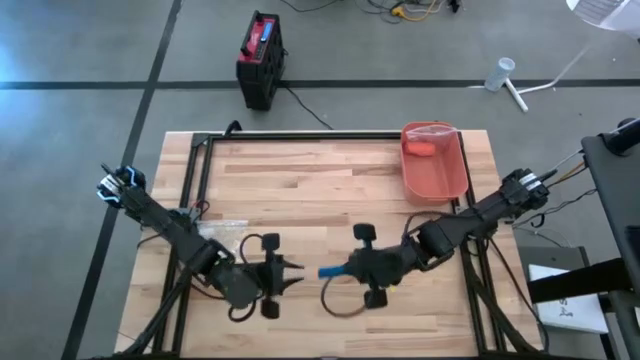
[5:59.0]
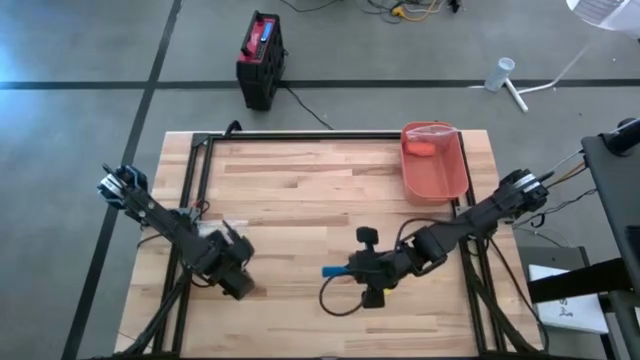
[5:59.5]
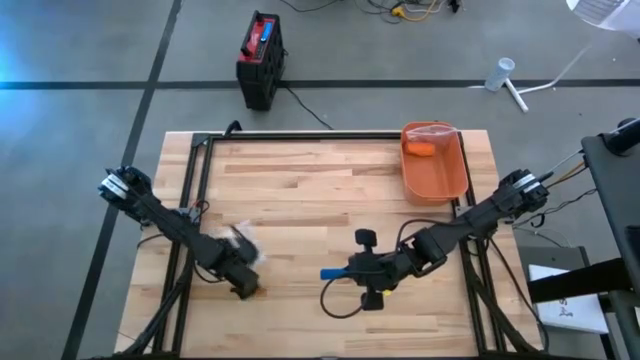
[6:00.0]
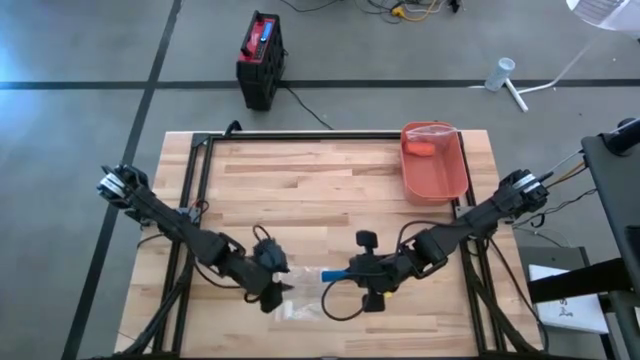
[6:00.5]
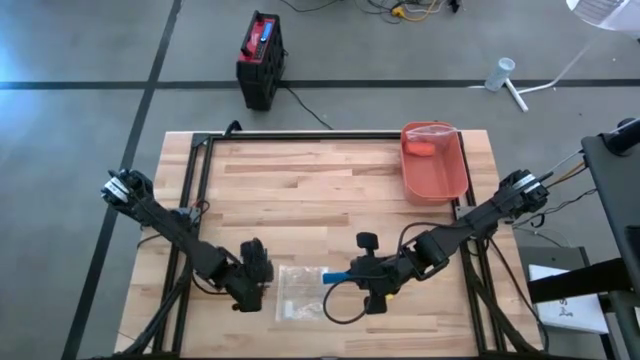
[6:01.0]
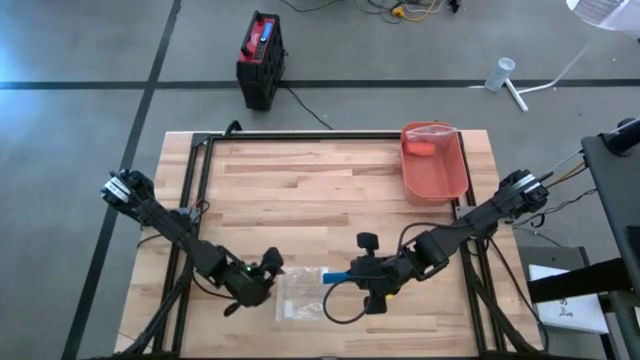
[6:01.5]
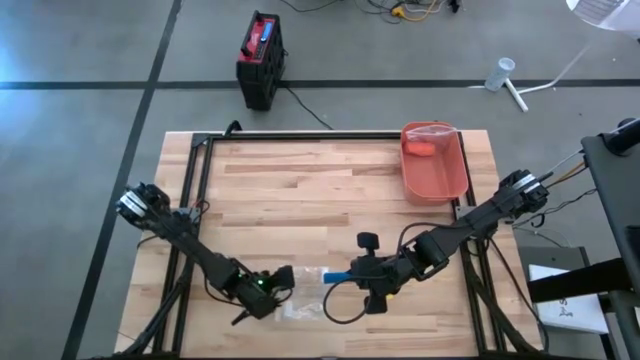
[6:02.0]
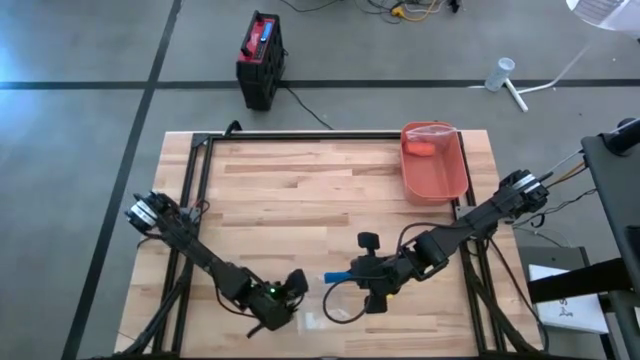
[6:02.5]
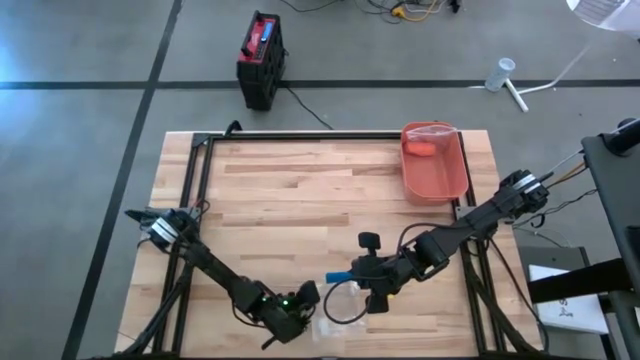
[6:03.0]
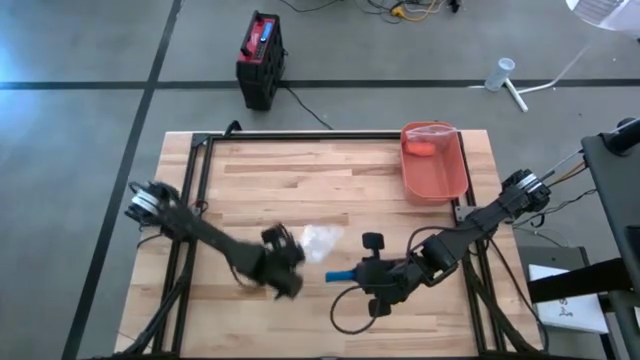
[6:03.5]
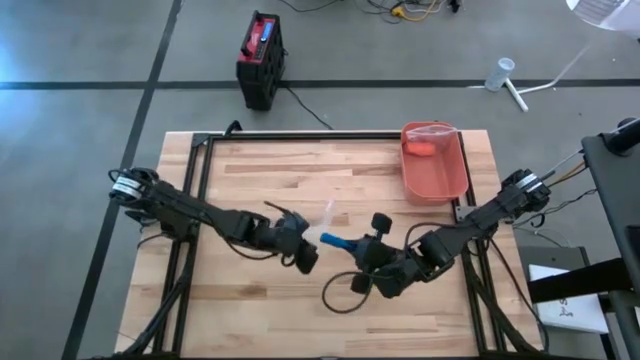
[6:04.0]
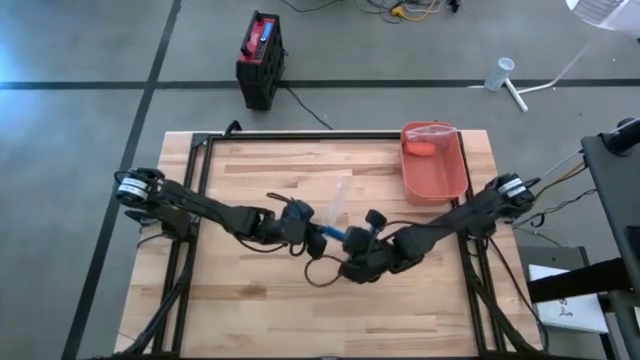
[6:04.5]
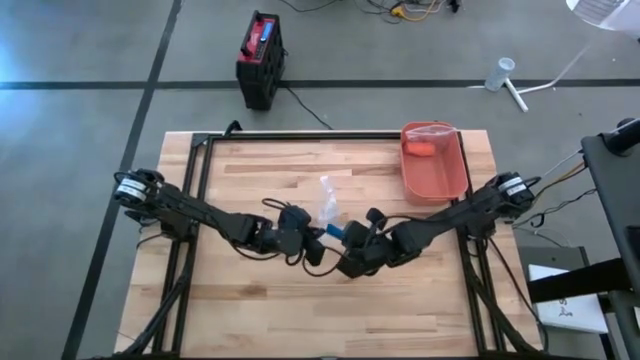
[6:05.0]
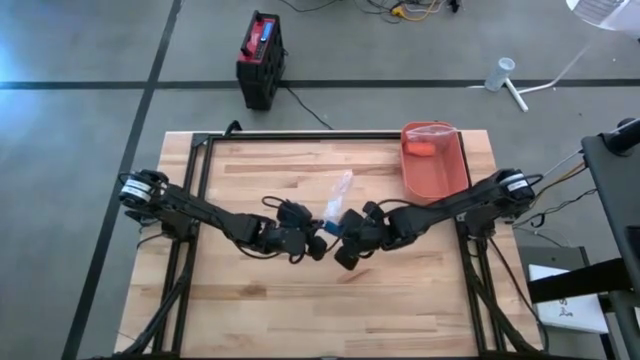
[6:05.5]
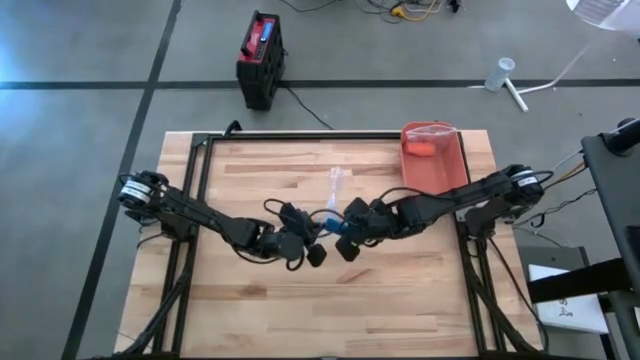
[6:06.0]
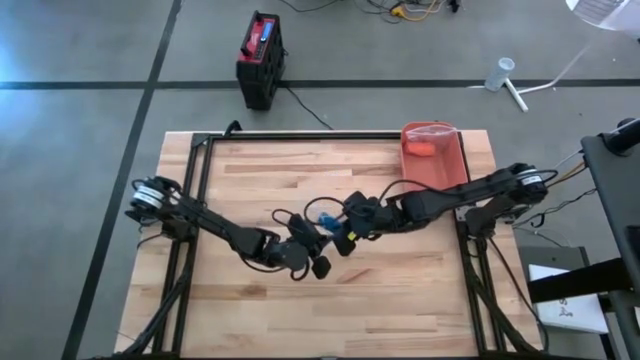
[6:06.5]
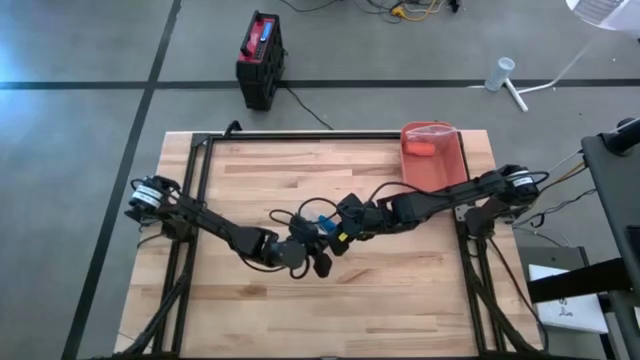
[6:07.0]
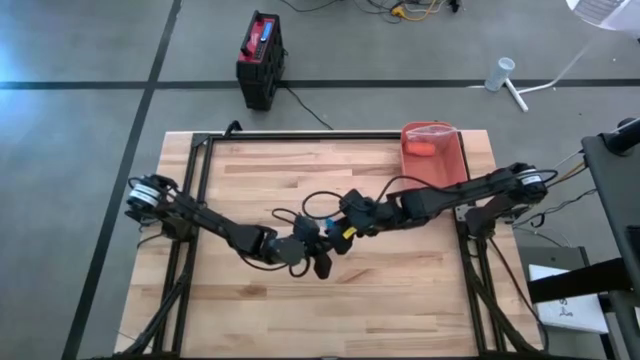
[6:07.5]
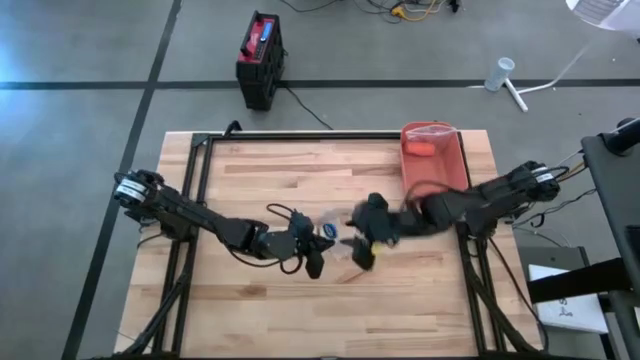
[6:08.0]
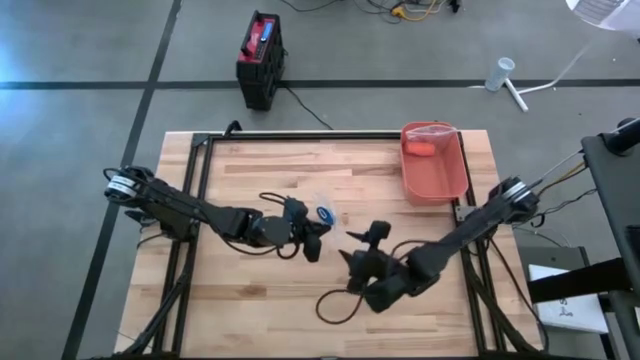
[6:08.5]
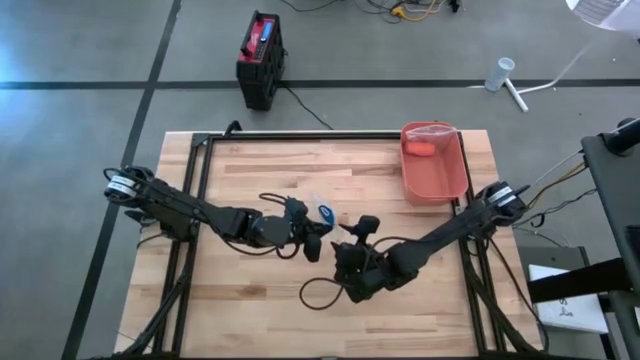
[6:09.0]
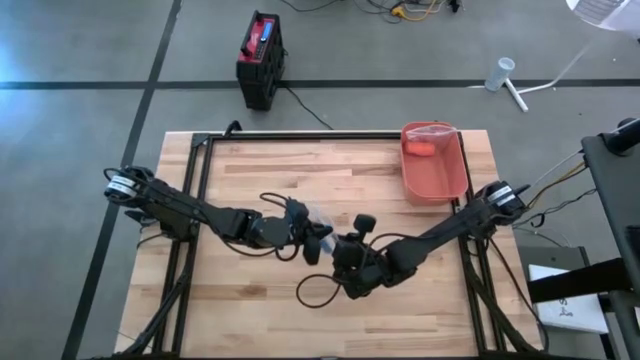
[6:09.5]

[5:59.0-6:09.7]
Task: Roll bandage
Put the blue bandage into the transparent zip bag

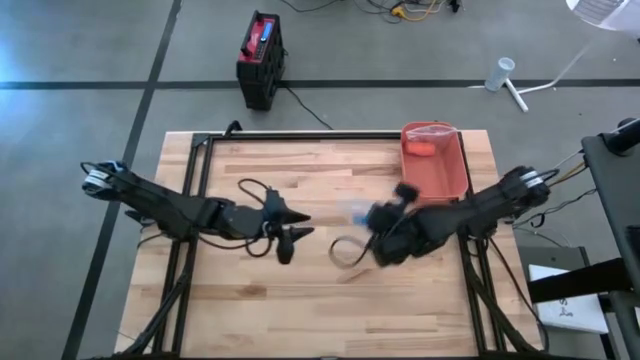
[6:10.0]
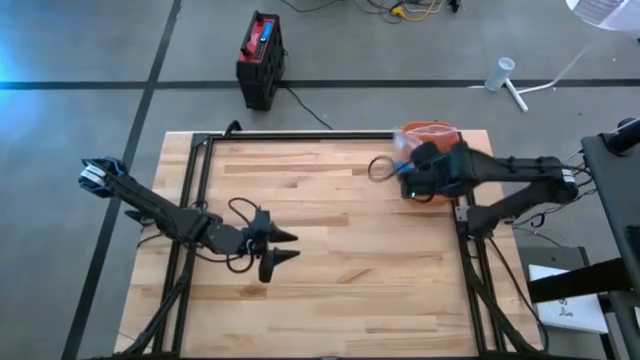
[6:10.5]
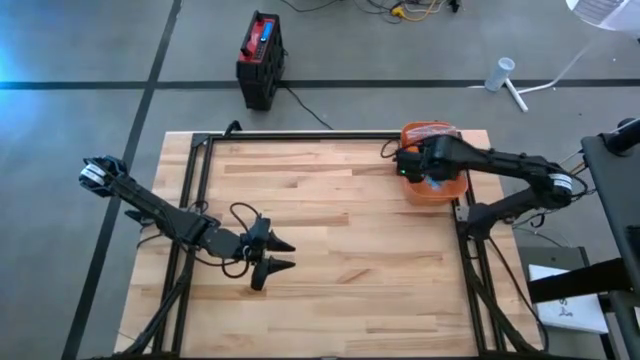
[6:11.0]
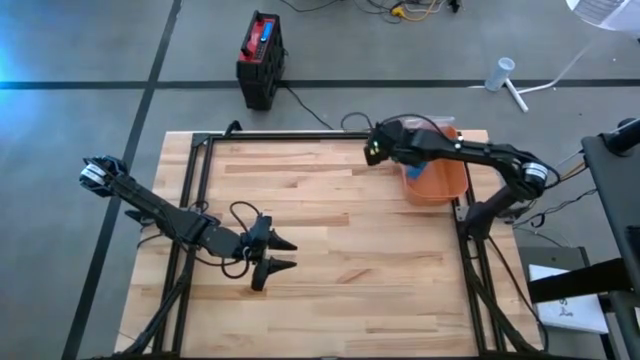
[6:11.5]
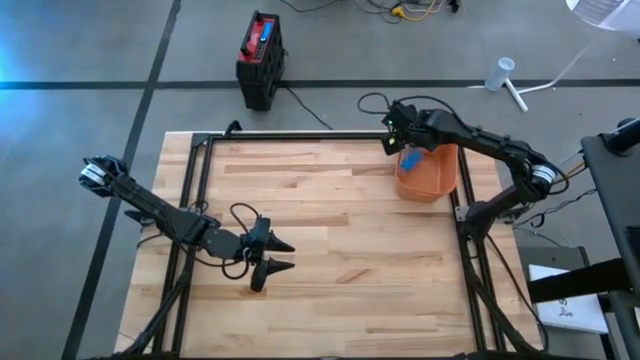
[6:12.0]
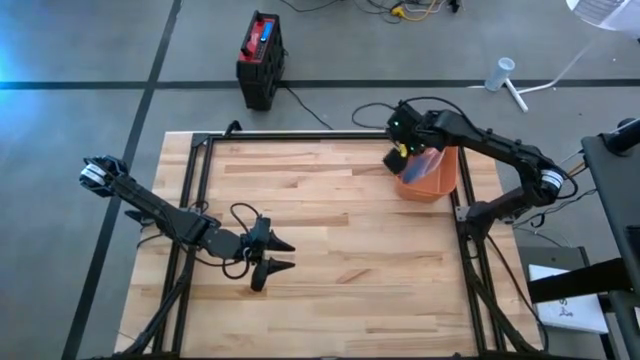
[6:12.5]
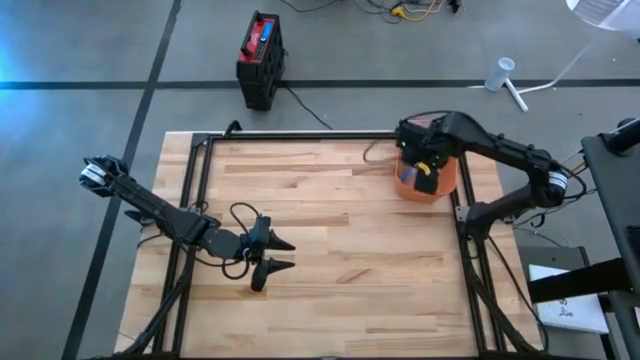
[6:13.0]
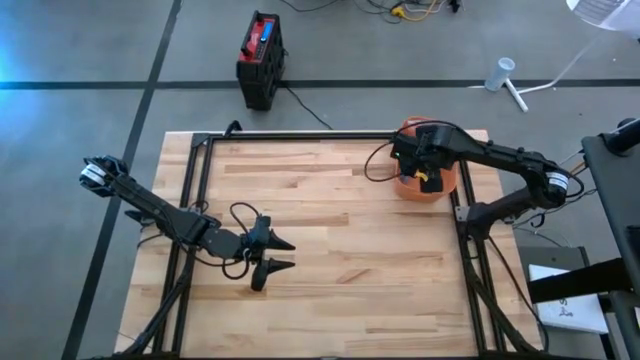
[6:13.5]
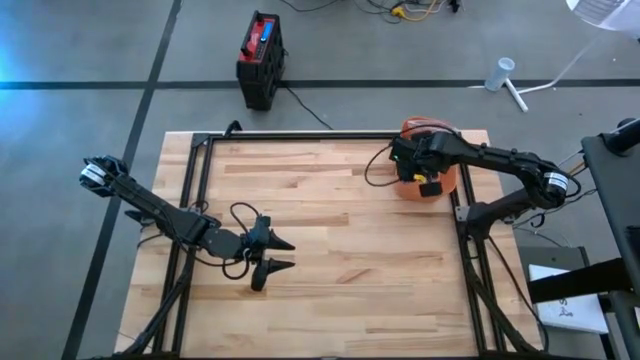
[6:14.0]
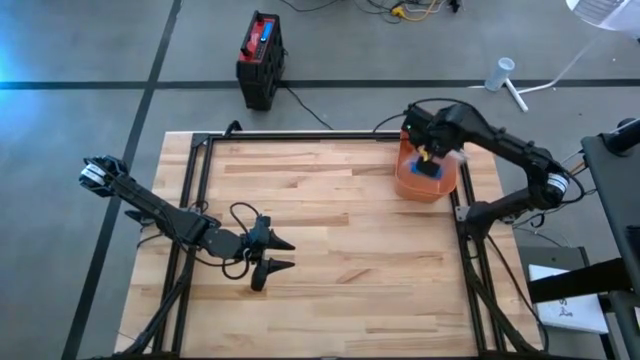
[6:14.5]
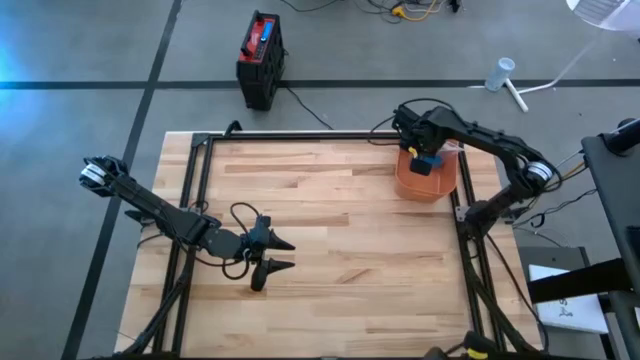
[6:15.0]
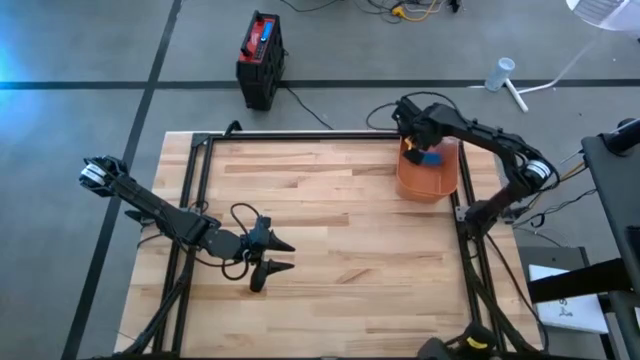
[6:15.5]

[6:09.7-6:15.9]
Put the transparent zip bag with blue bandage into the orange bin

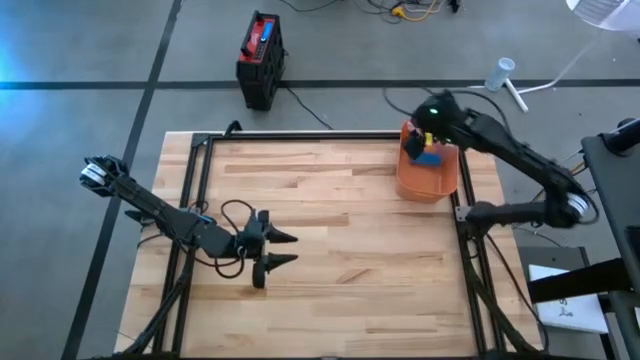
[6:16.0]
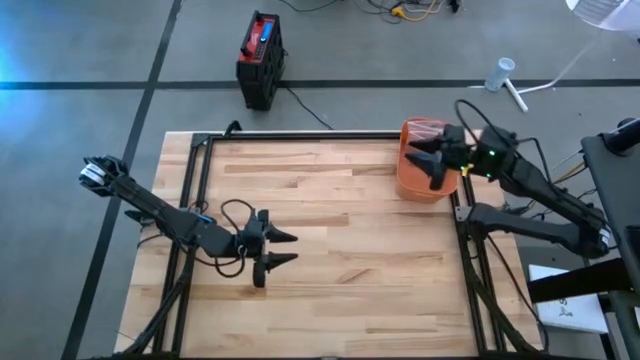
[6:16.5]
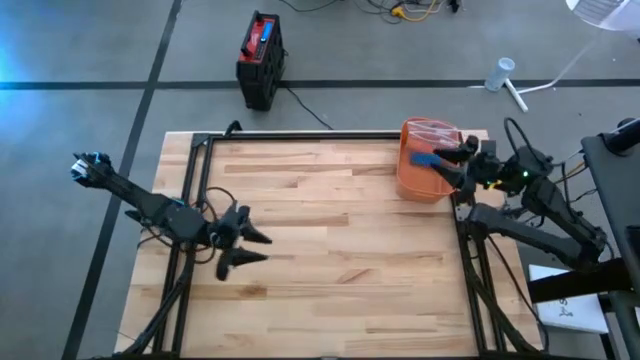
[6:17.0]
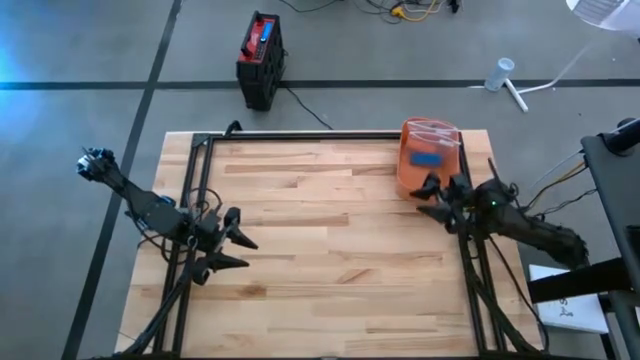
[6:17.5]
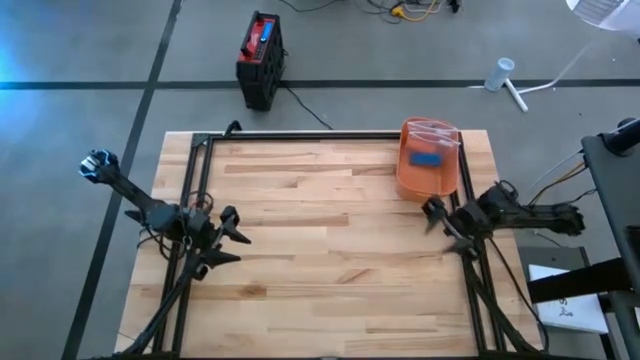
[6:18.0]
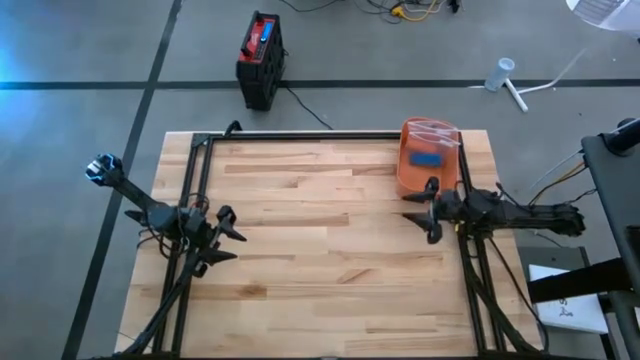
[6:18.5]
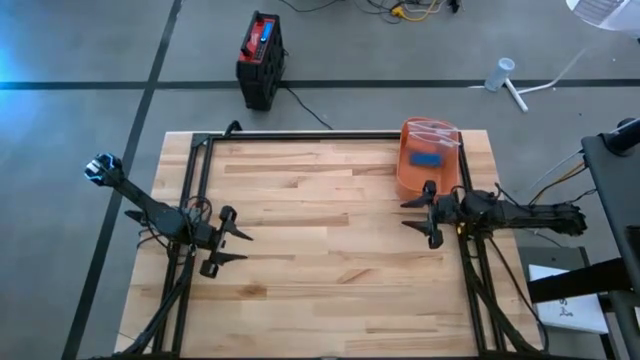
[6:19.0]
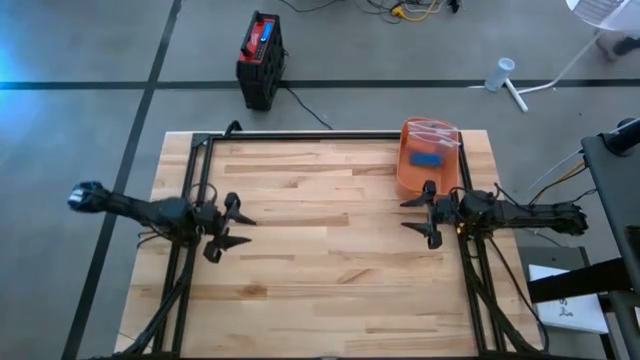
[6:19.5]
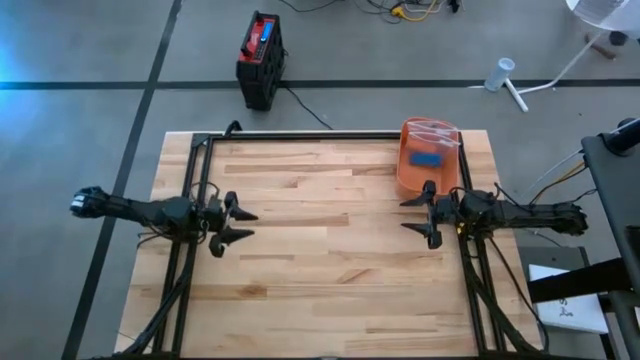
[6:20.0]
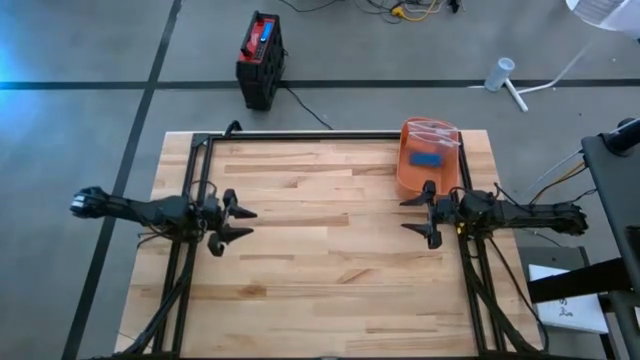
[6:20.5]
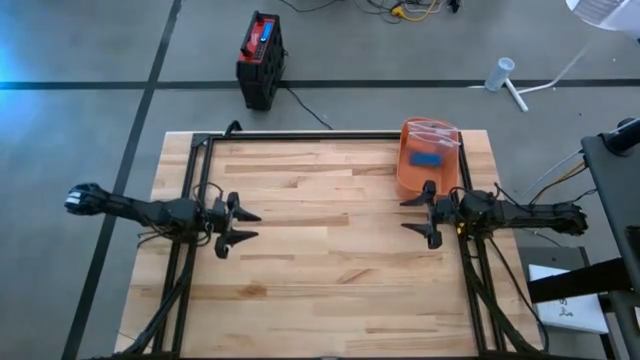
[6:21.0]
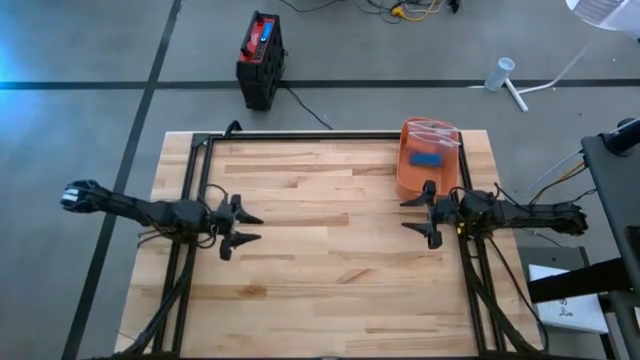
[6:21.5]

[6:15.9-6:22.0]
Return to Home Position
